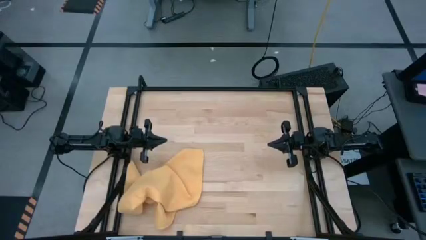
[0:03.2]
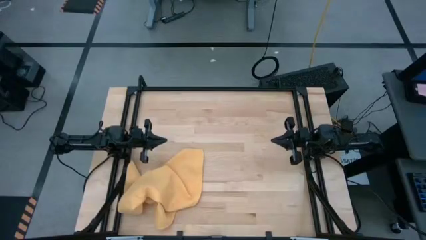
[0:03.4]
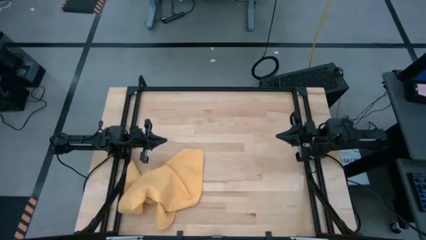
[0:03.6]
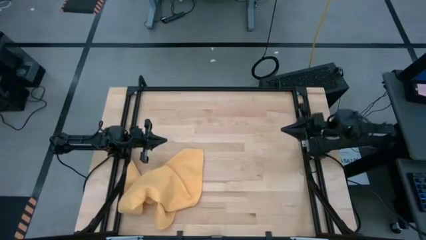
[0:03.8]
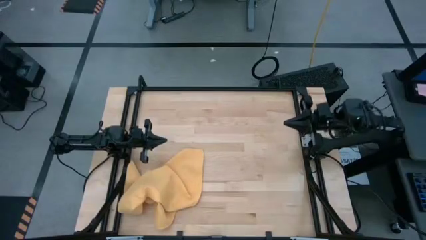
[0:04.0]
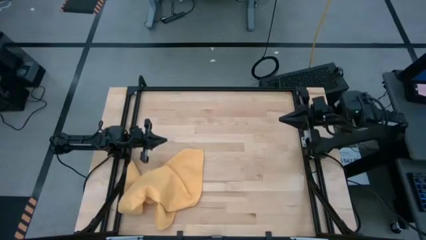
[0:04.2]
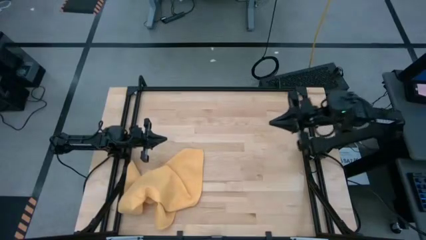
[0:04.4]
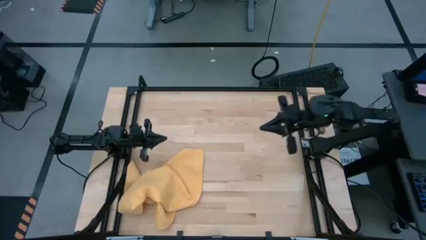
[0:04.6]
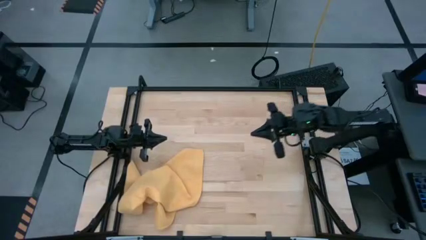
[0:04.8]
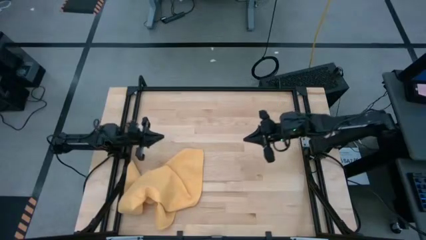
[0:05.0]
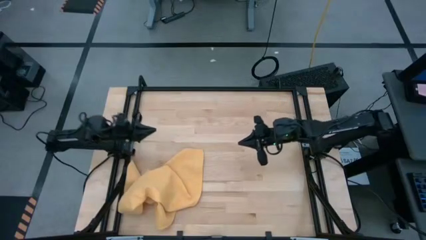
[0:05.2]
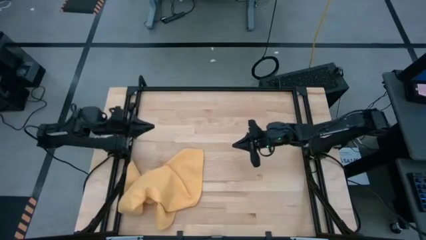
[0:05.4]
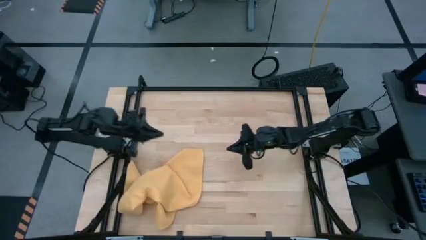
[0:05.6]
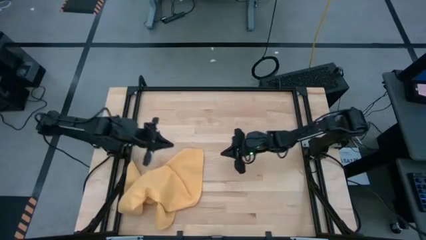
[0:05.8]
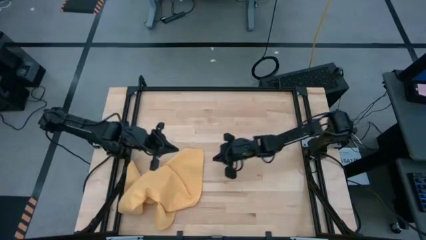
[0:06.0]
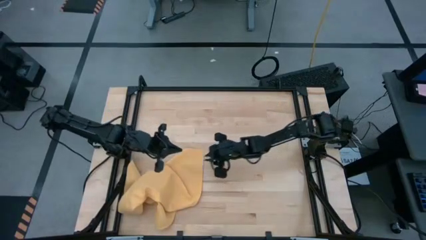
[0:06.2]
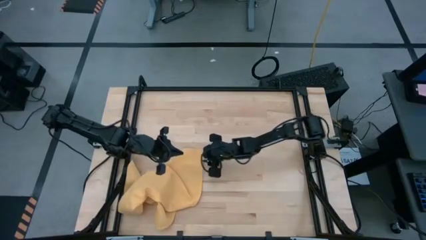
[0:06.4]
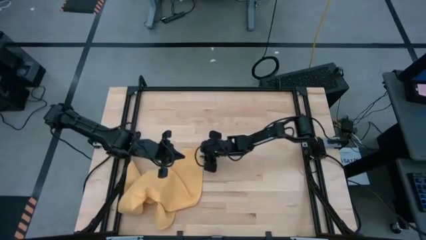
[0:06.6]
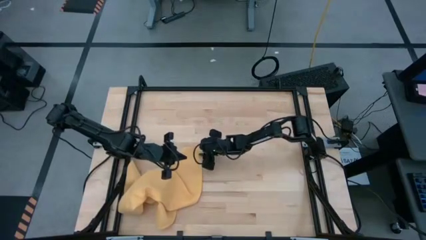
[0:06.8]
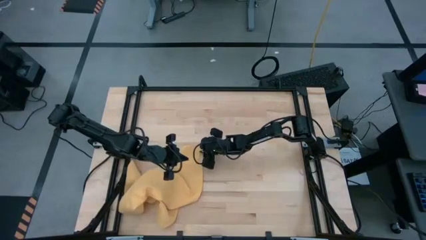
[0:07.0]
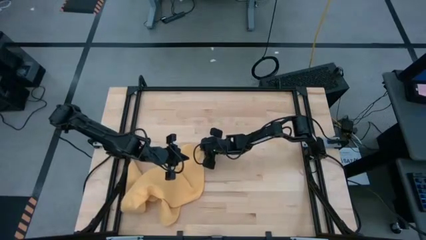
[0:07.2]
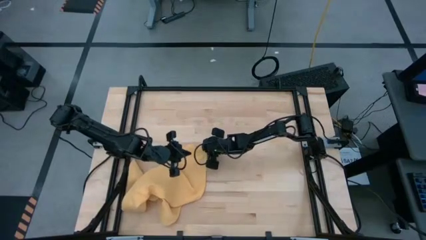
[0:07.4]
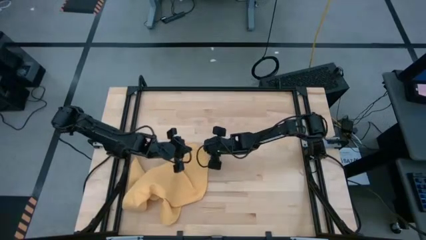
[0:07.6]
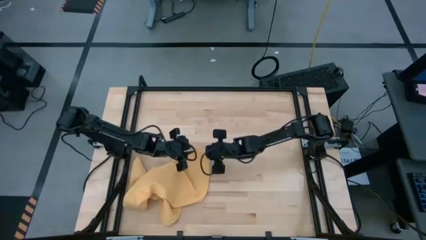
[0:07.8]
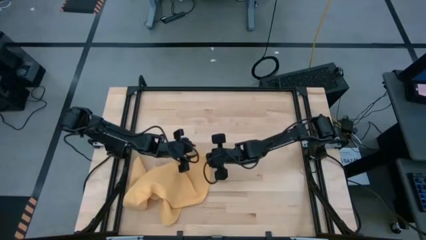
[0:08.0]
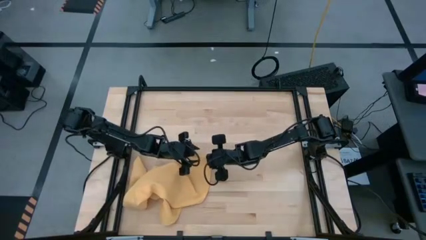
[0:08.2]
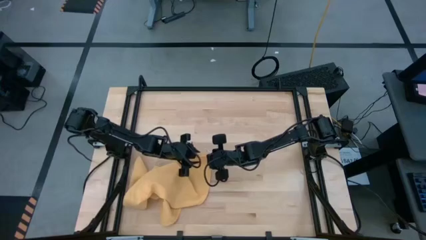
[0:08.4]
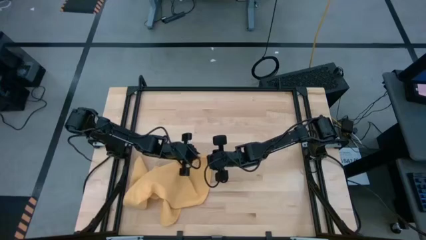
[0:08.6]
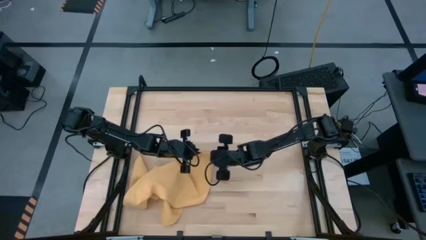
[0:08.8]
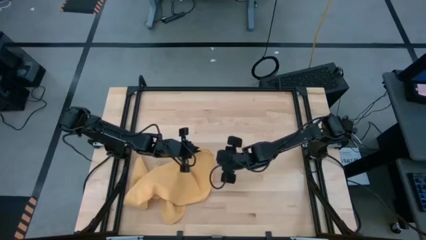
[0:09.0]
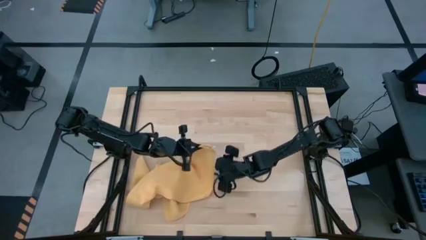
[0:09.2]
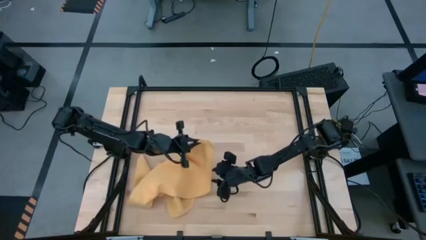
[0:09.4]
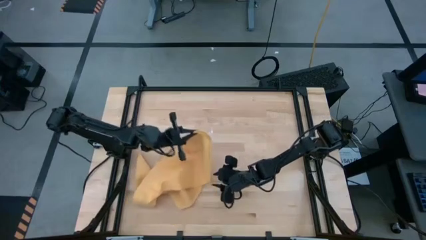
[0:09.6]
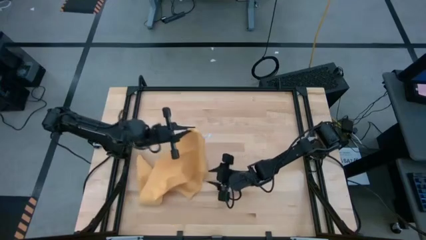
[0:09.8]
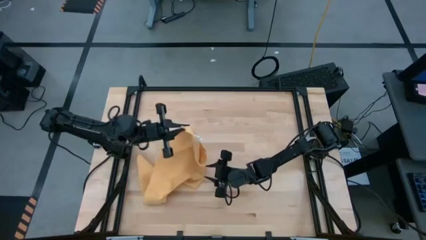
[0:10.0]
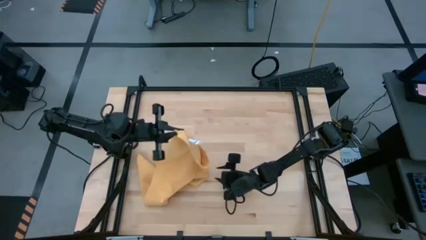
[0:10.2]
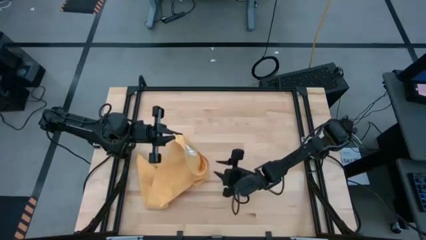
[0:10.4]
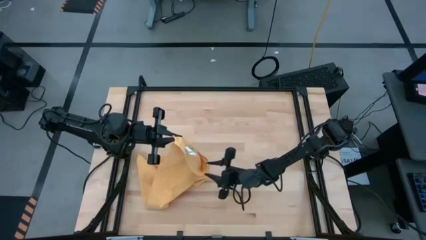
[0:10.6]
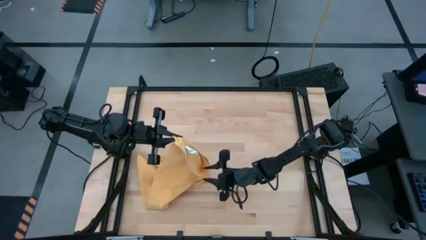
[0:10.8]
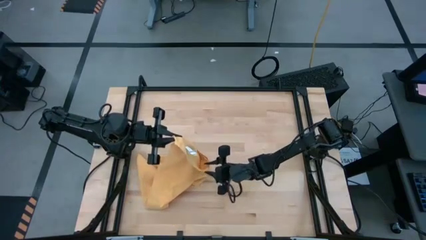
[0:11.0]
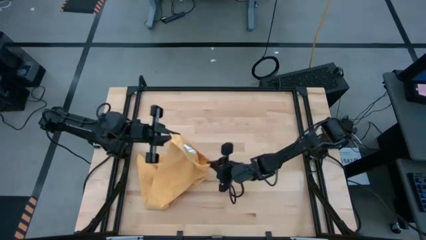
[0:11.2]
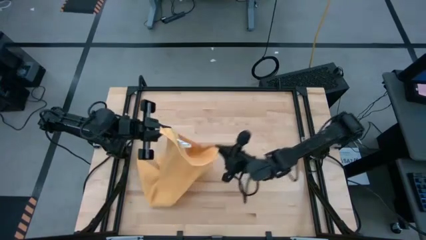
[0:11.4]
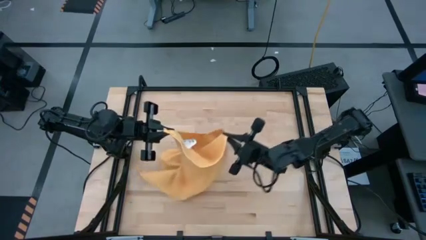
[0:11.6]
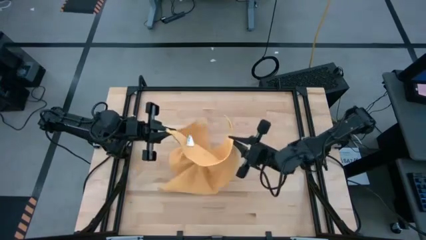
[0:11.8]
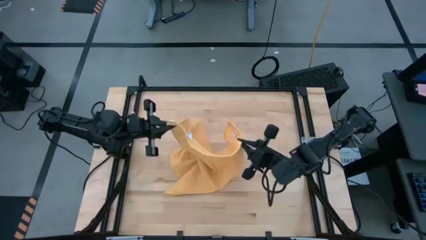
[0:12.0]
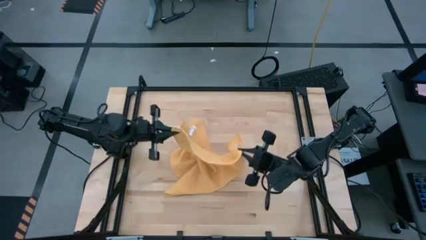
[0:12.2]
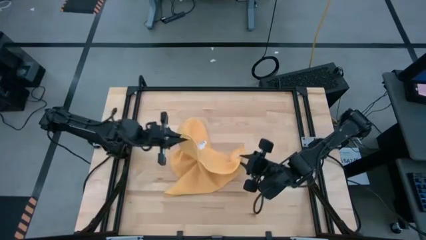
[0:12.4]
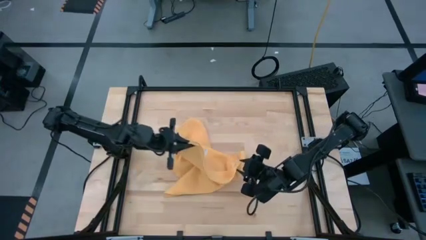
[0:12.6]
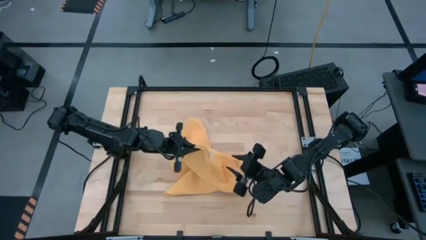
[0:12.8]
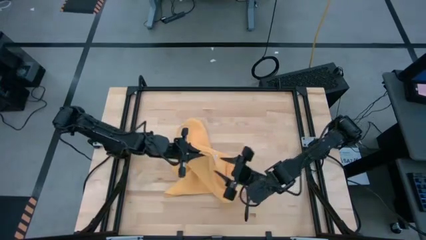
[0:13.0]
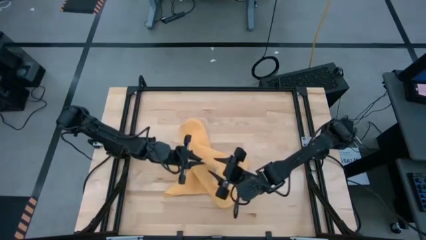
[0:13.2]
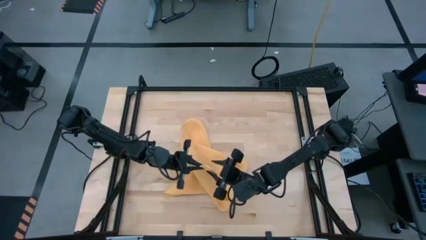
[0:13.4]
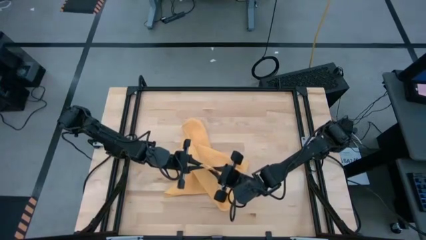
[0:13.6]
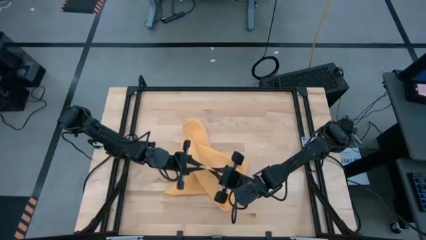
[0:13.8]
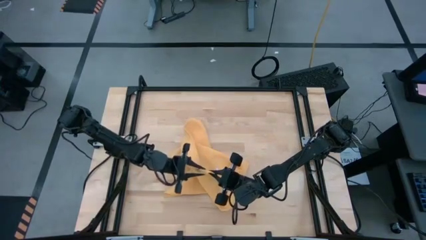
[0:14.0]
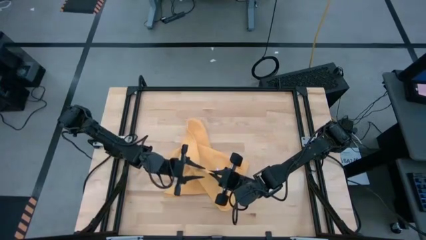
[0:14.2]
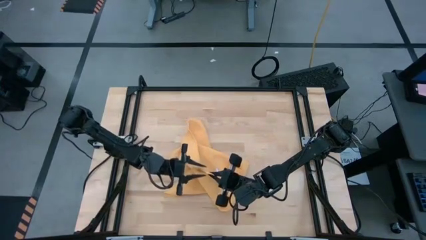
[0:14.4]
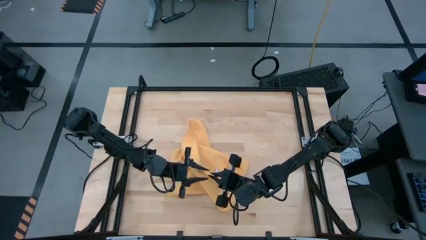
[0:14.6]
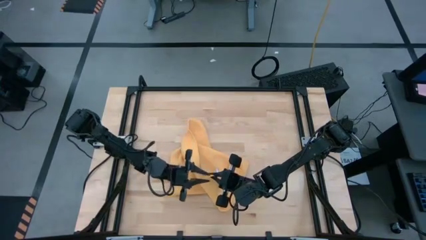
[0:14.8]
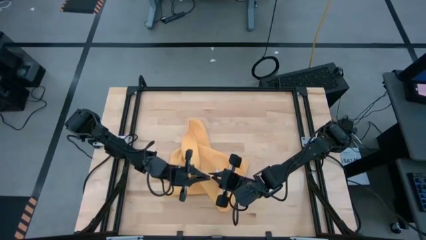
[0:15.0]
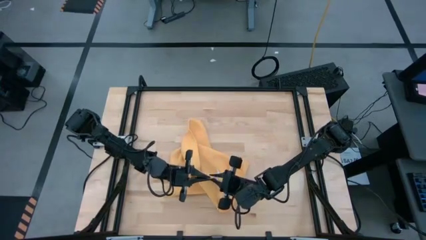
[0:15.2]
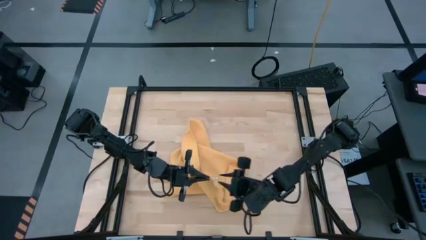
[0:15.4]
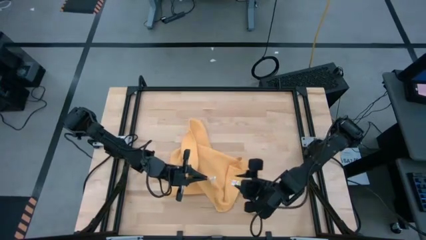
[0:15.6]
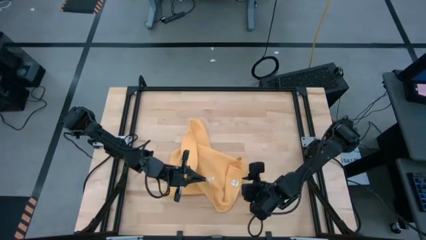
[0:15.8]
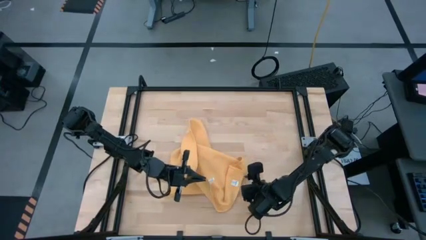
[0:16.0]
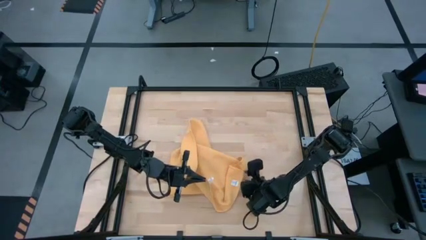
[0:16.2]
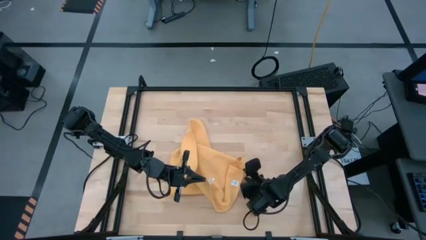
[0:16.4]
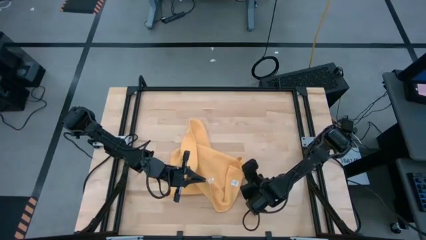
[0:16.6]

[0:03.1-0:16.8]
Task: Roll towel
Roll the yellow towel

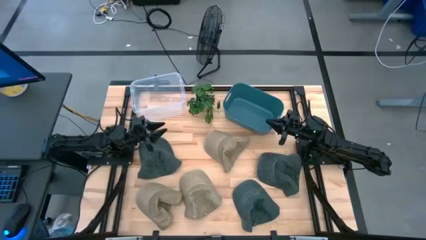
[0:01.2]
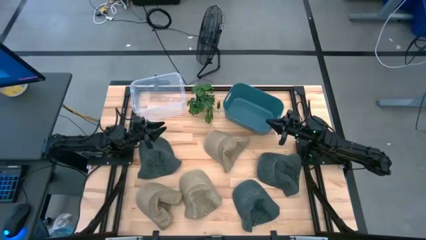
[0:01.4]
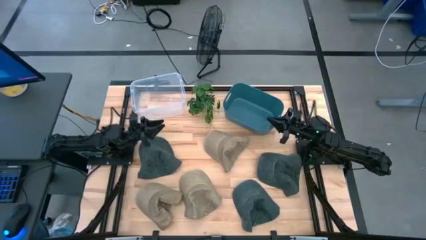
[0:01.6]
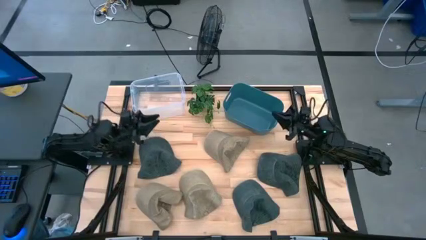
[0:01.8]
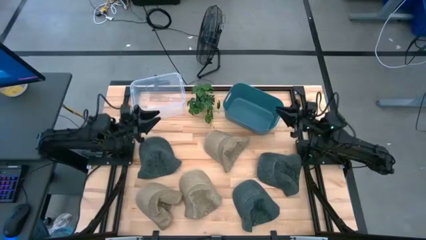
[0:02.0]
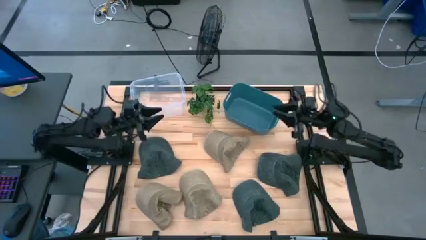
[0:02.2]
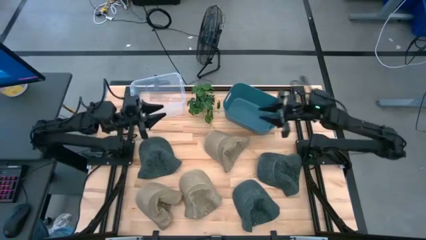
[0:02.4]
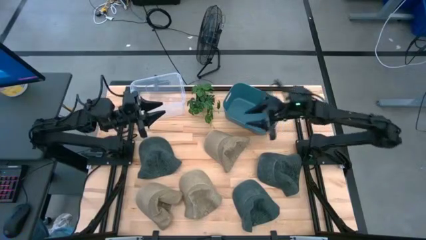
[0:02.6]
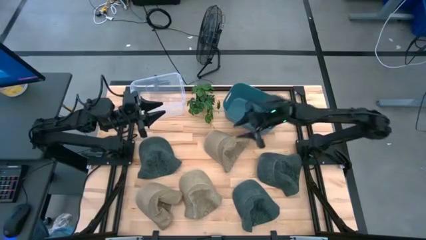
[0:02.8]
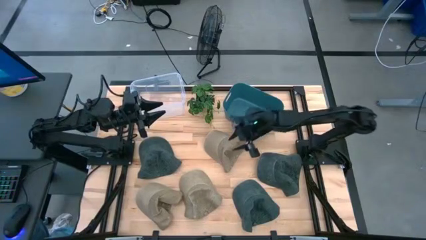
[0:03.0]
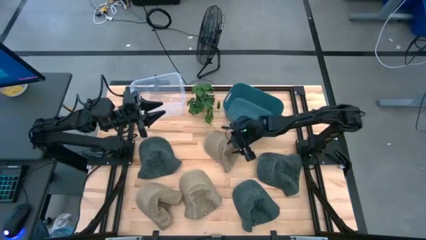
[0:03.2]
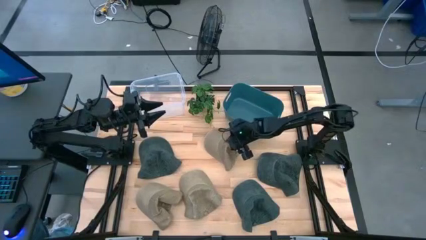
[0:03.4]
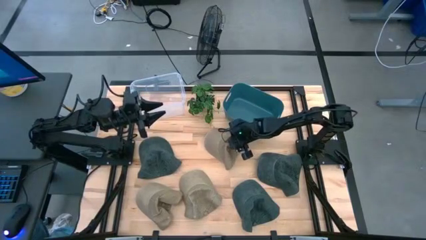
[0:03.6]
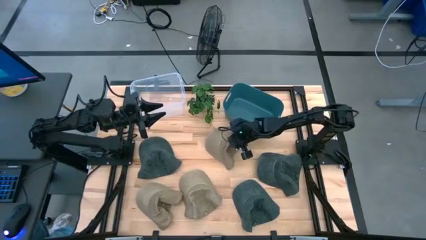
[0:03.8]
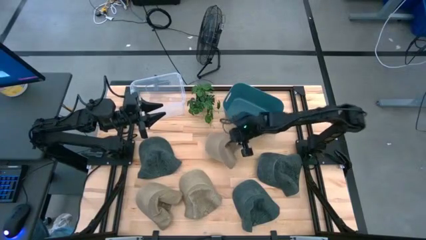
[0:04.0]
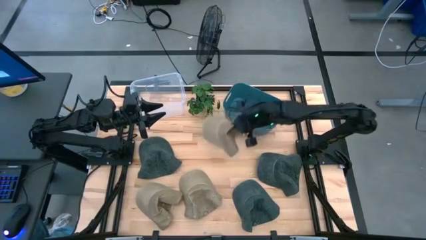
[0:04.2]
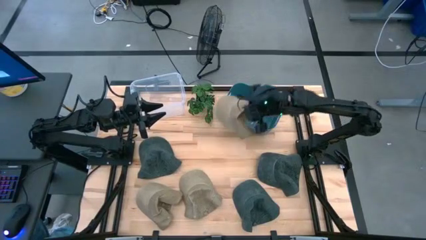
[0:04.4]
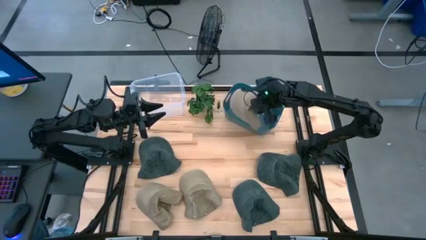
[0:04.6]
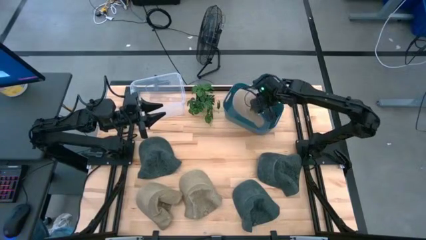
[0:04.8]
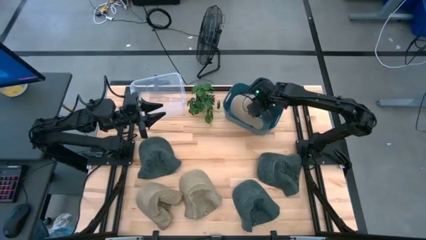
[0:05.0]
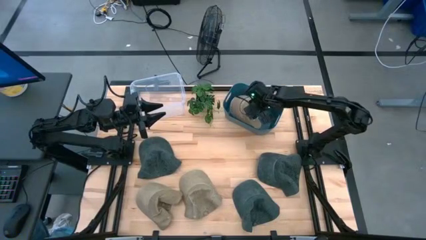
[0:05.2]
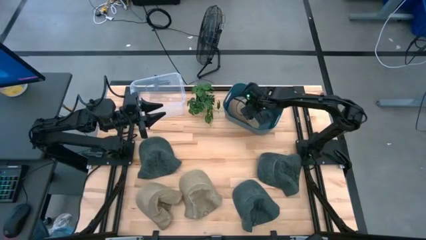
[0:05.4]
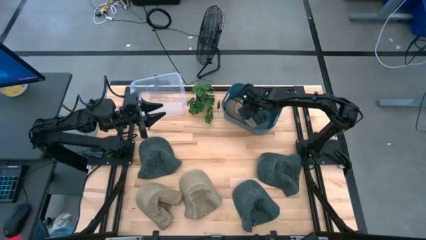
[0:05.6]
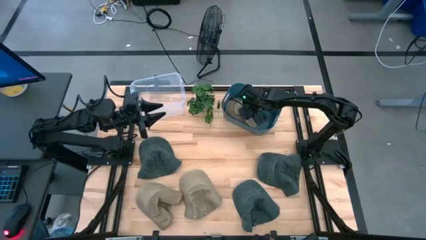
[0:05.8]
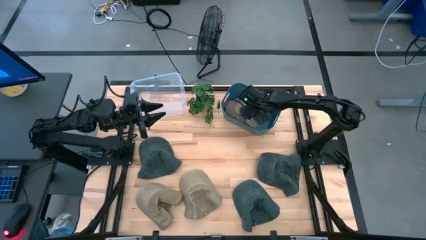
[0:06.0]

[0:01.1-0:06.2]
Task: Pick & Place hat
Put the middle brown cap into the blue bin
